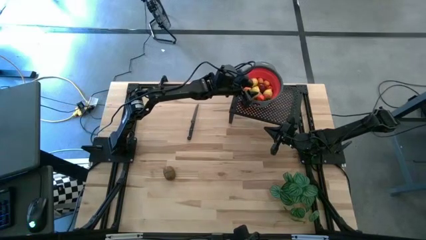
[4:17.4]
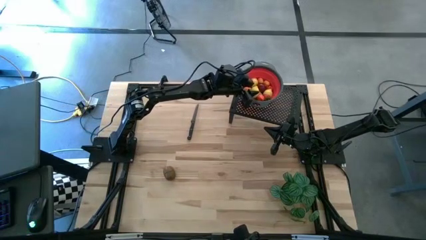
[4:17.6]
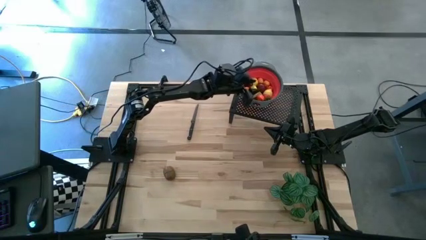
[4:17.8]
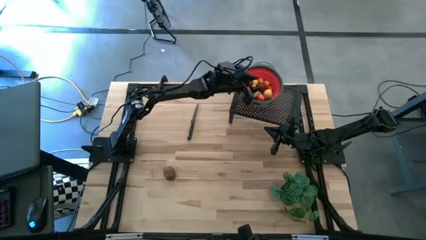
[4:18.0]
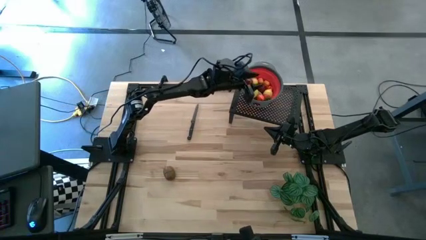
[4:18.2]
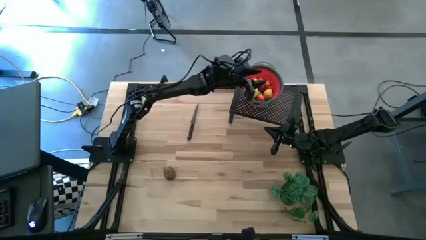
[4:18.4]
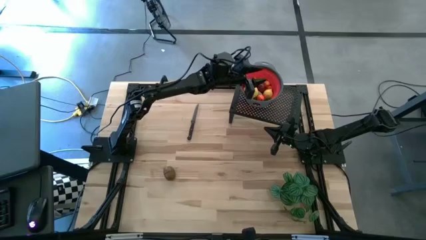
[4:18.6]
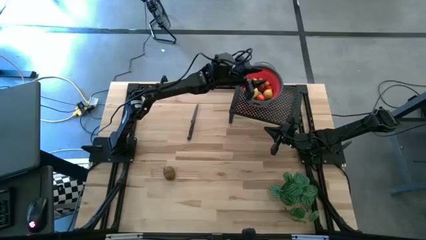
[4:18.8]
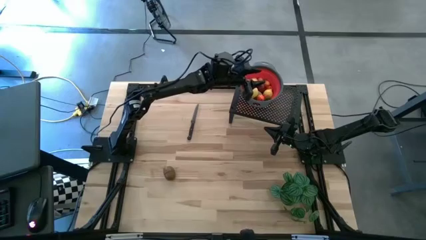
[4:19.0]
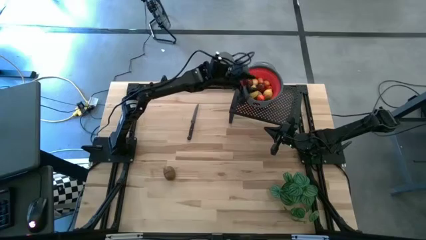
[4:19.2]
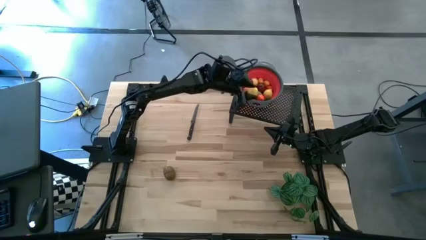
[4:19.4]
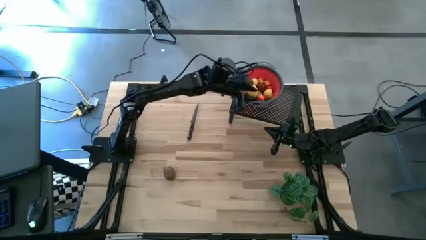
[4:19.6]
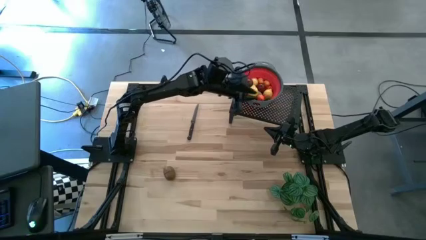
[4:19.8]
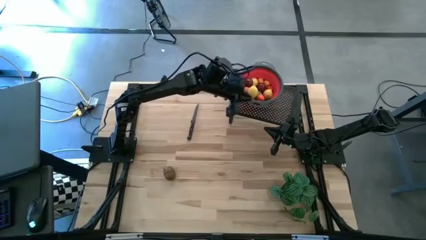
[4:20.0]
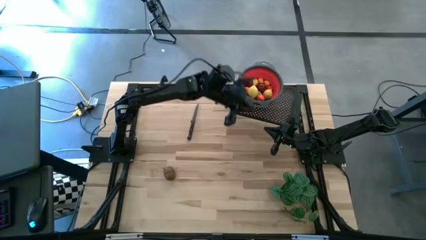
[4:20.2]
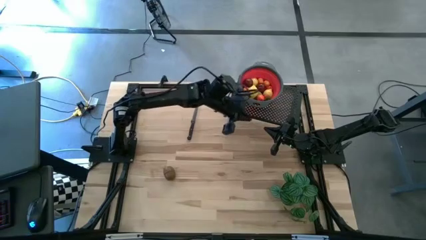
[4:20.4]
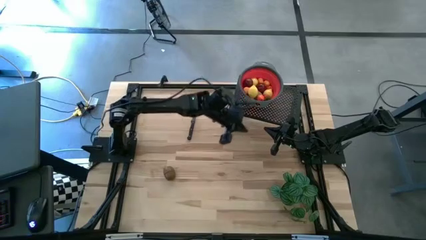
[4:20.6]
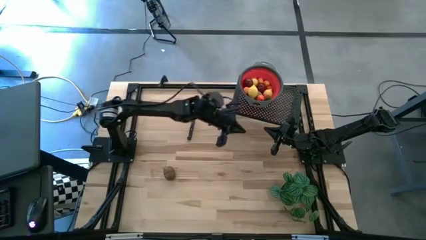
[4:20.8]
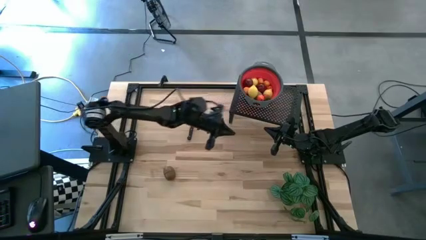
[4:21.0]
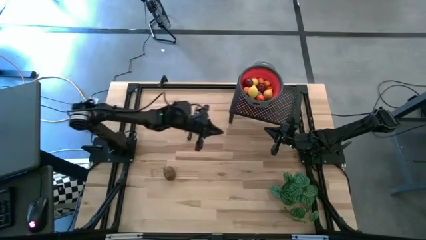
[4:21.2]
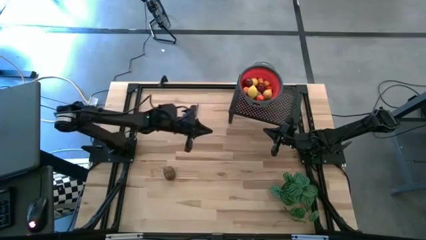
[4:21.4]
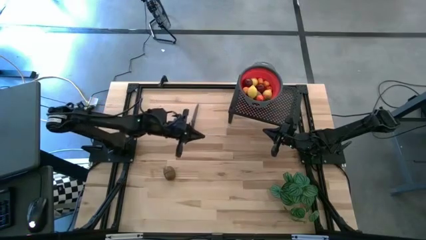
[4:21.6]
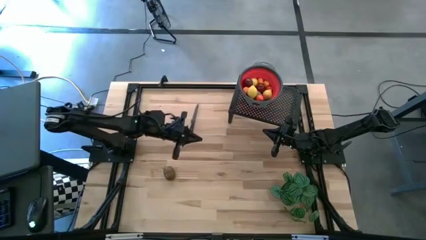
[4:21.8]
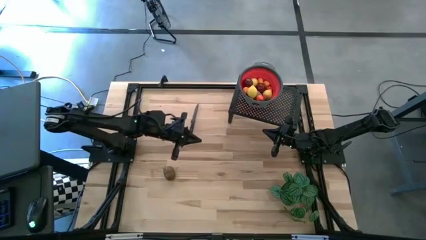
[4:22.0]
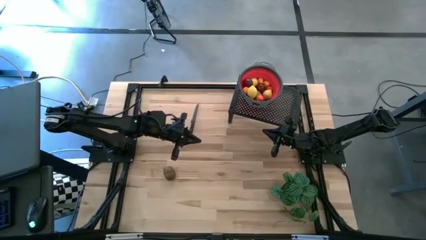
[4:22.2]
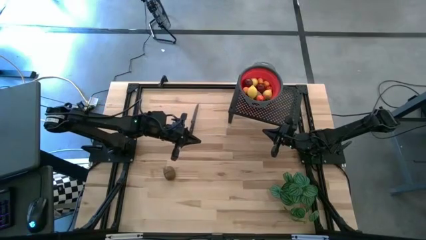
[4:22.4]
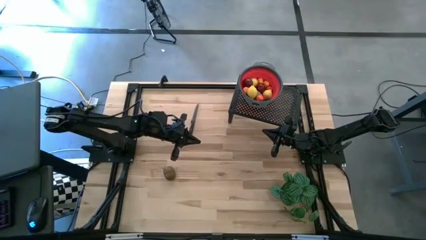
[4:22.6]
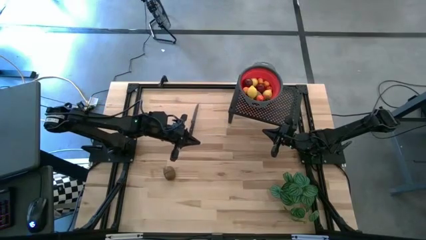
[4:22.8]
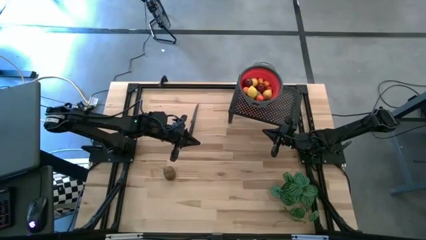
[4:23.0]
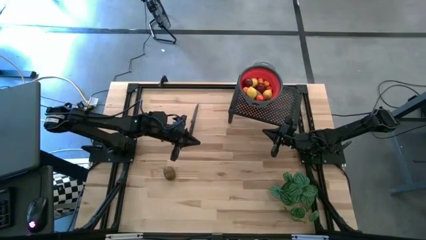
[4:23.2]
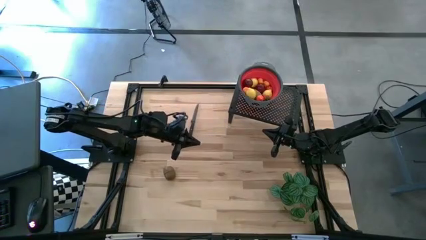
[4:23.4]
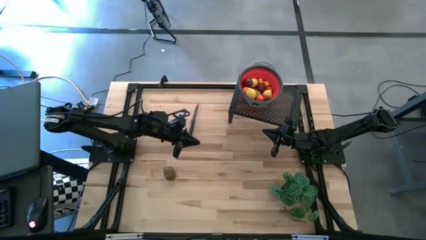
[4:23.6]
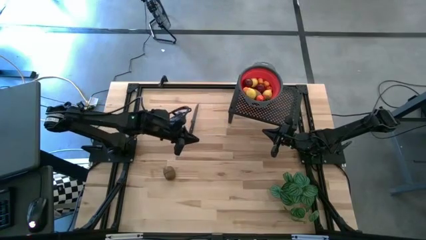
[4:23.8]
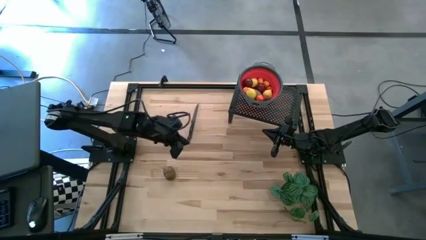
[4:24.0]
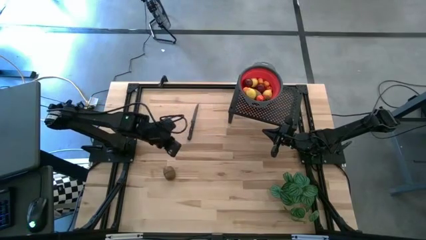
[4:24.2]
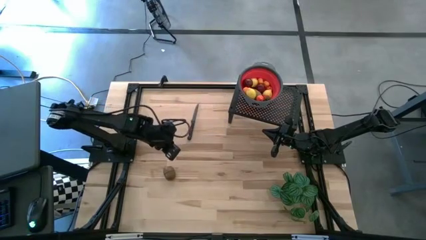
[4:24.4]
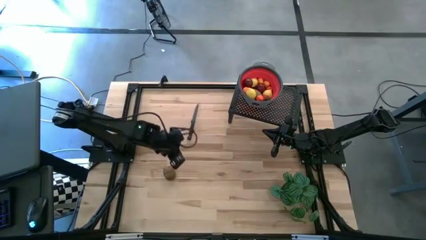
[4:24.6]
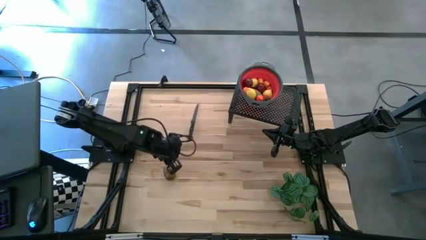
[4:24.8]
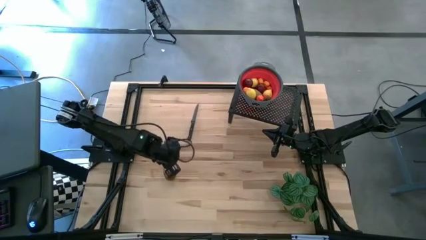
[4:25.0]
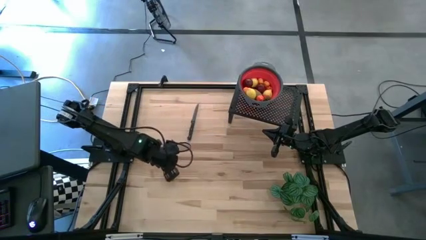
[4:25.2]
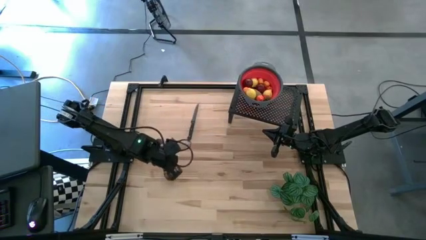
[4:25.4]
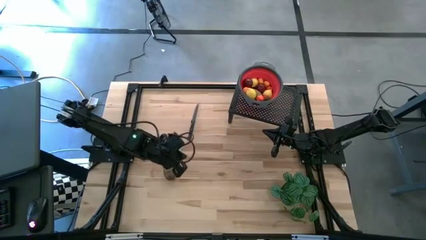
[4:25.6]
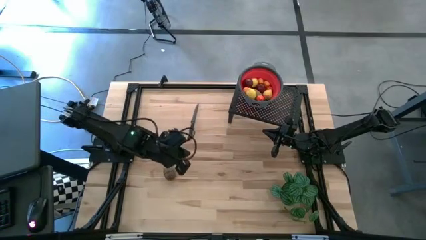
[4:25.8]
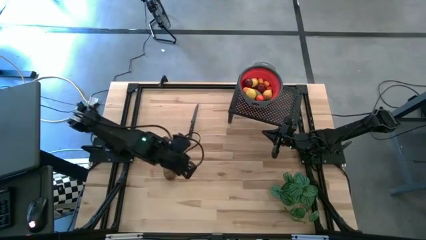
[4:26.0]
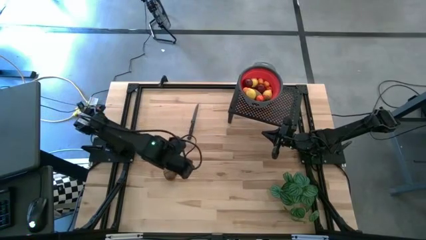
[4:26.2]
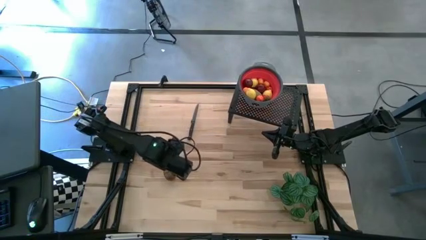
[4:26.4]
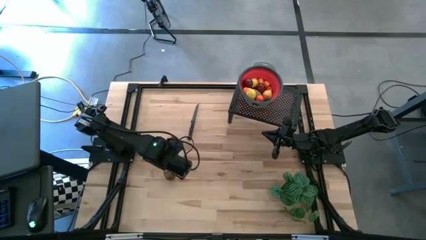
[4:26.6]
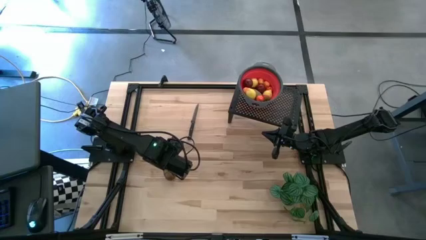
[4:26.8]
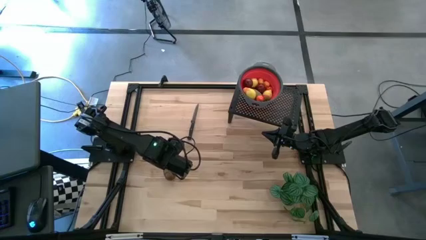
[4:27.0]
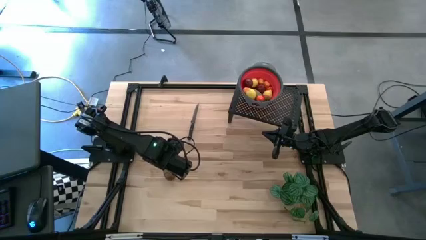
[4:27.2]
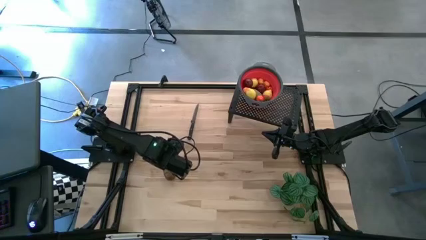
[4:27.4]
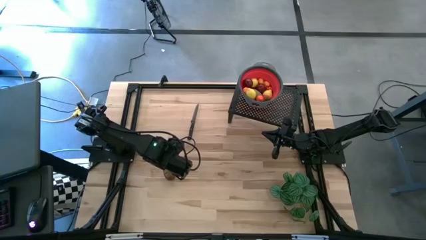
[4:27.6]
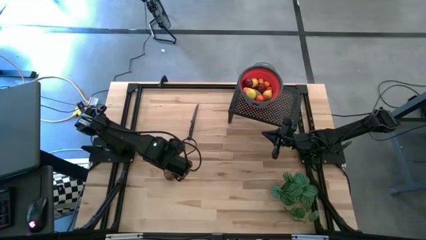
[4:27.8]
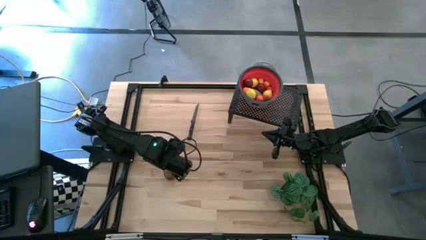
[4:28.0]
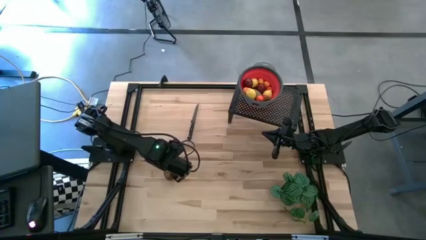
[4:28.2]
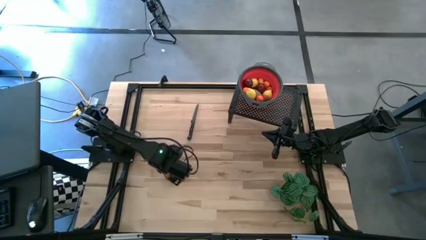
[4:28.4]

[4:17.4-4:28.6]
Task: Pick & Place Fruit
Put the brown kiwi into the red strainer bowl on the shelf

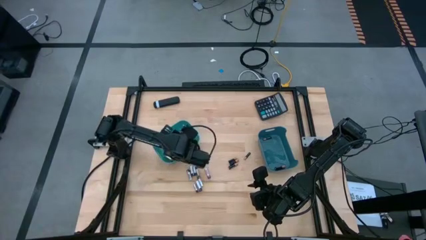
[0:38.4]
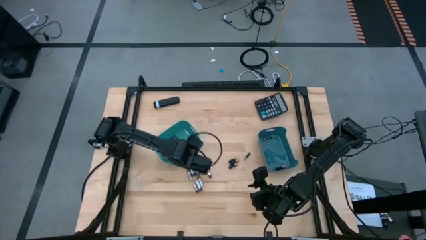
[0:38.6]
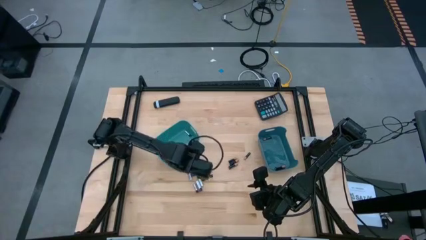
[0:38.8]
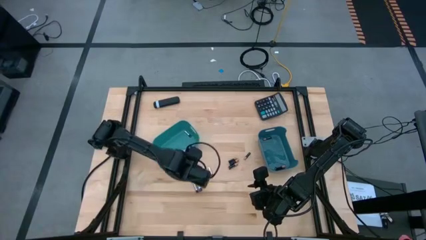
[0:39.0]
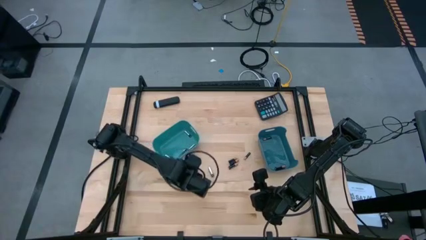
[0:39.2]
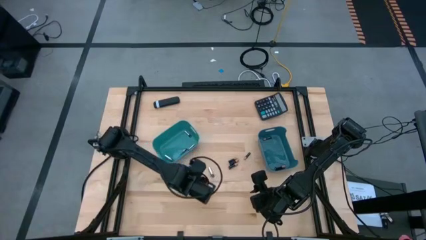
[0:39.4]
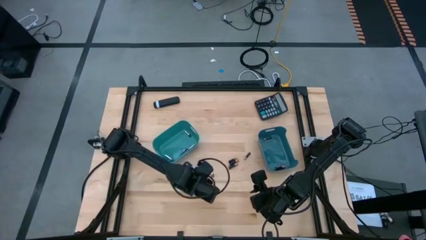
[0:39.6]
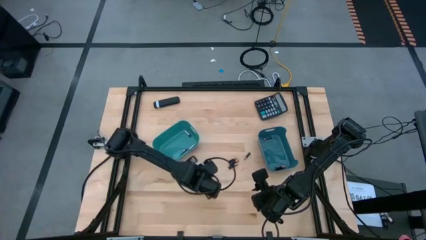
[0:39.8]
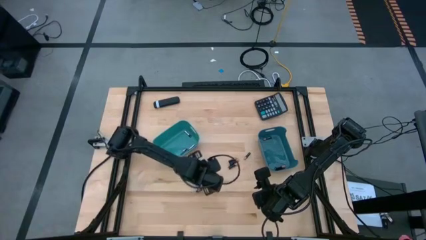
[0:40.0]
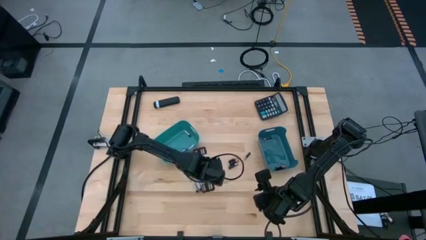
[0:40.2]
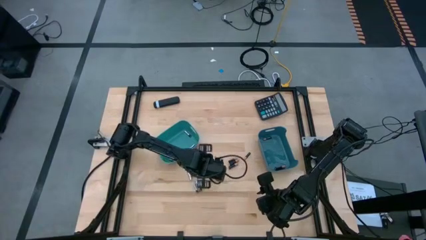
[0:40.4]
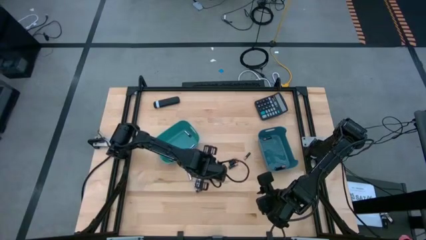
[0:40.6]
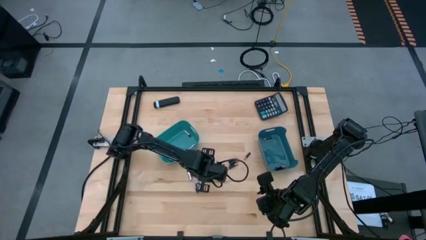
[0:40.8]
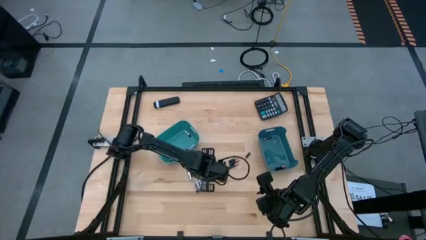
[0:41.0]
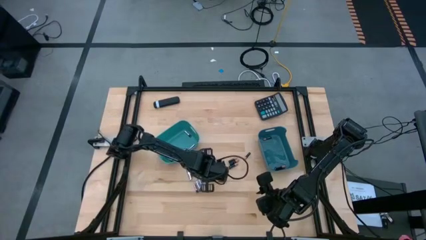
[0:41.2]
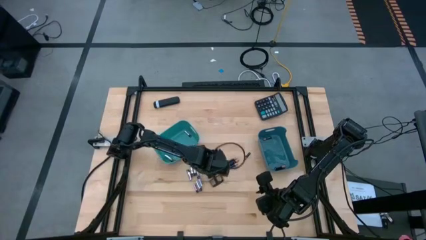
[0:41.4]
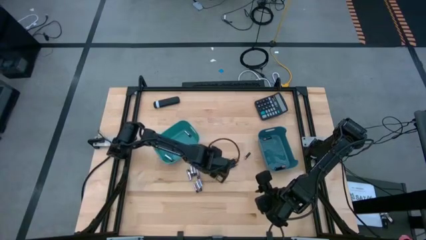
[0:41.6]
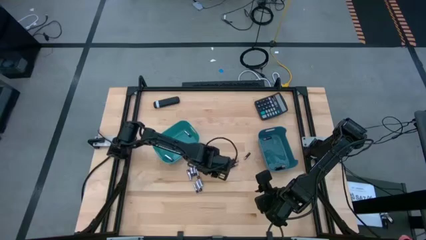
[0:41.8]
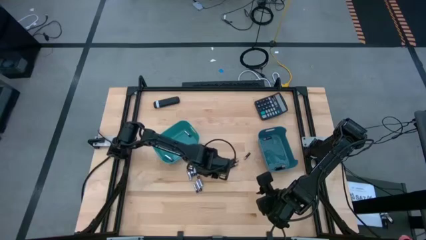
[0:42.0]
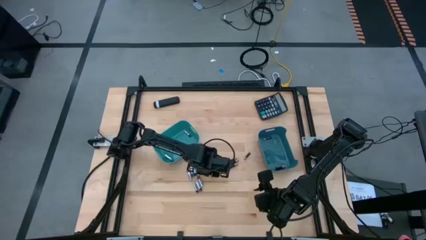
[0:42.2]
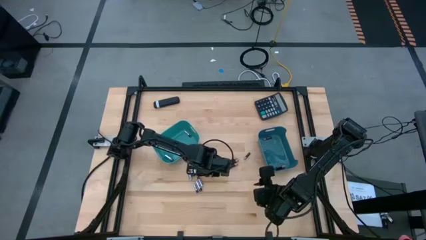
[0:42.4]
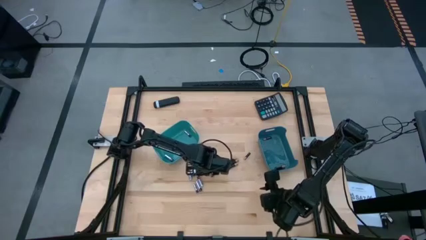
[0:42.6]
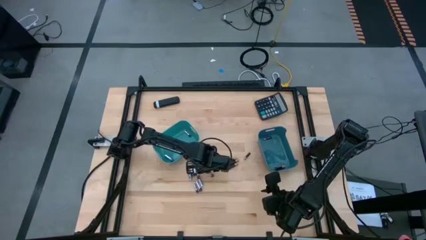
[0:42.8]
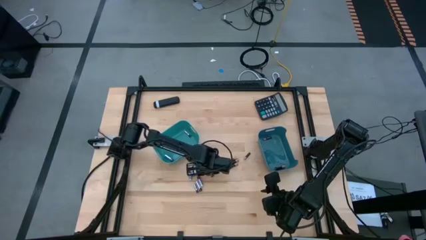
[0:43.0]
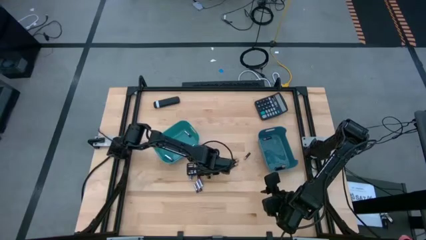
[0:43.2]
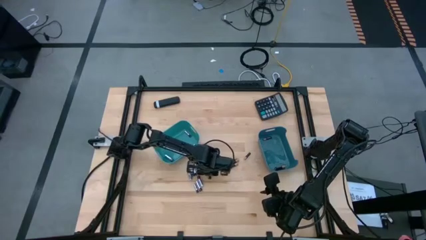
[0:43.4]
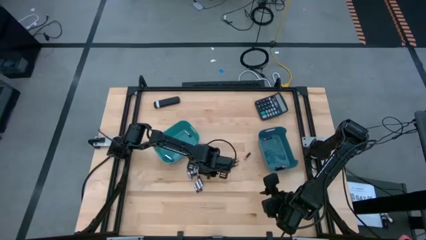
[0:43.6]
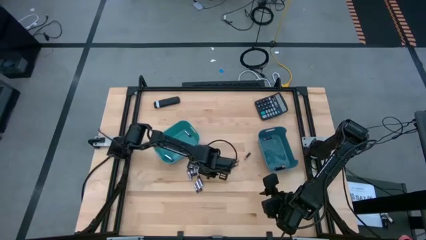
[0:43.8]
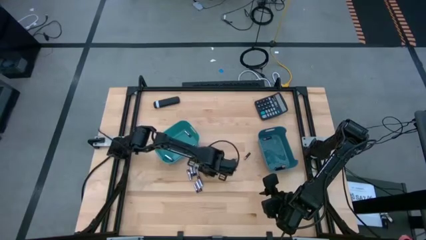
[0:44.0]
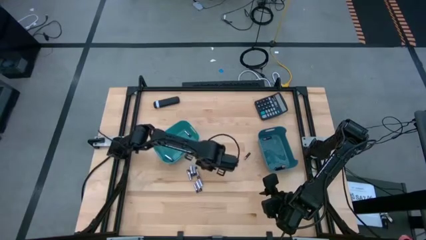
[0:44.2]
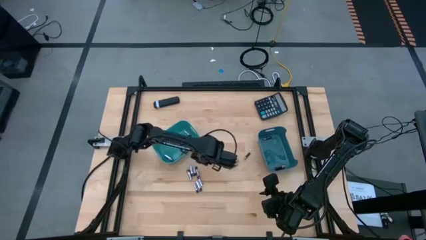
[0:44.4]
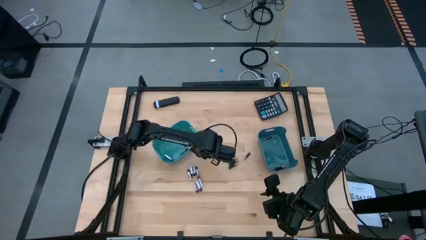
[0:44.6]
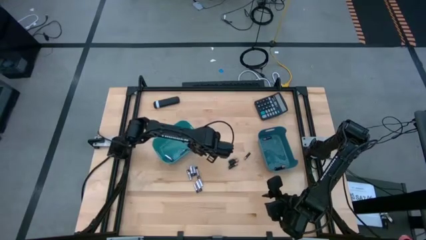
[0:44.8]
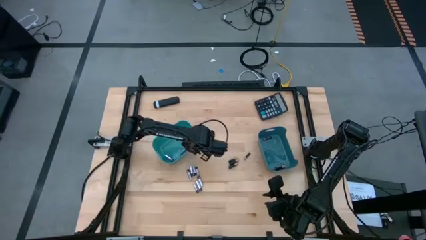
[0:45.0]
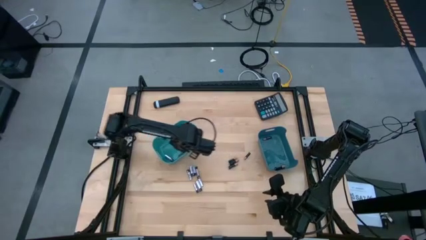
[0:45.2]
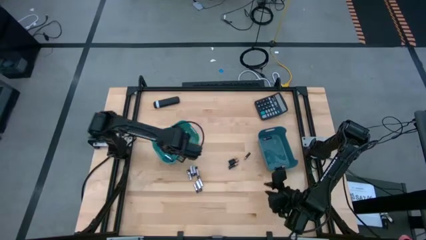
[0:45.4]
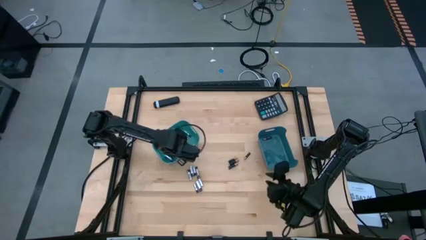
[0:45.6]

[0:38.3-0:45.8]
Task: Sort batteries
Put the white battery into the green bin
